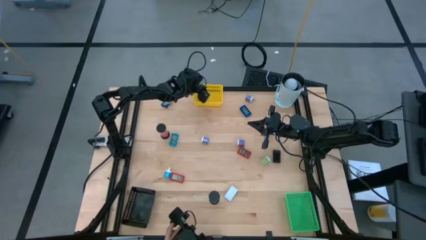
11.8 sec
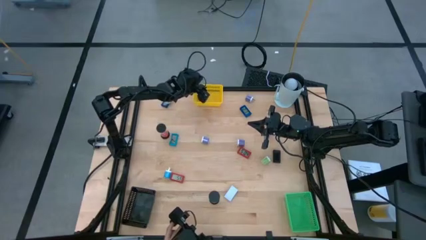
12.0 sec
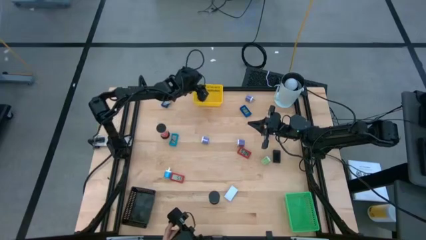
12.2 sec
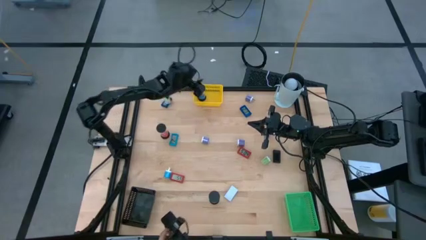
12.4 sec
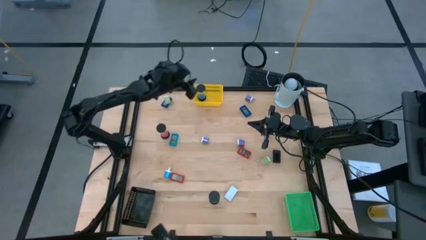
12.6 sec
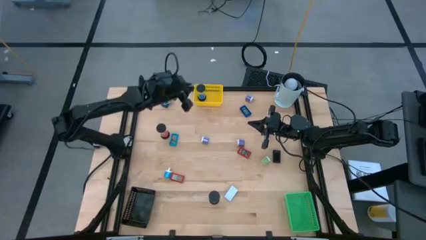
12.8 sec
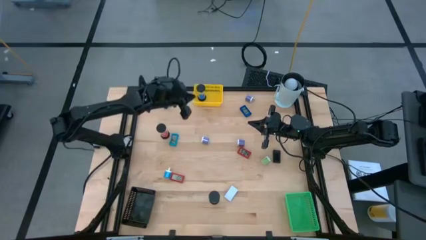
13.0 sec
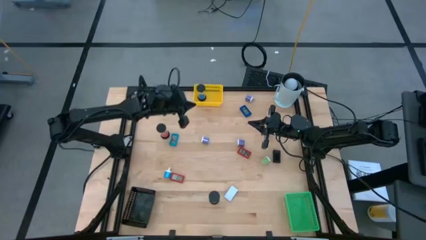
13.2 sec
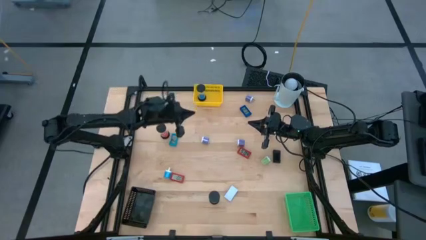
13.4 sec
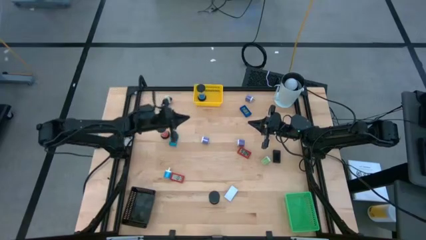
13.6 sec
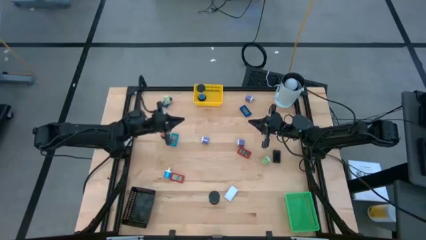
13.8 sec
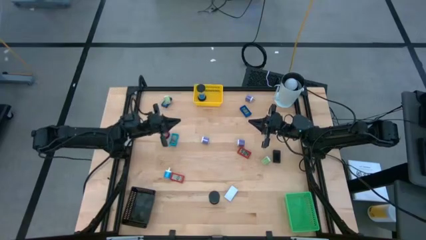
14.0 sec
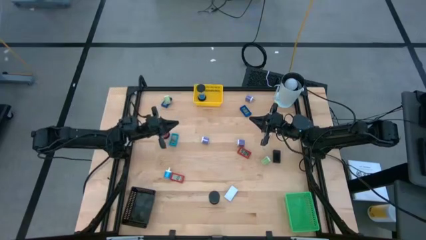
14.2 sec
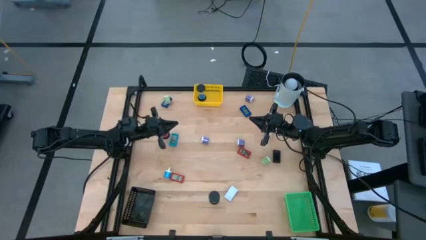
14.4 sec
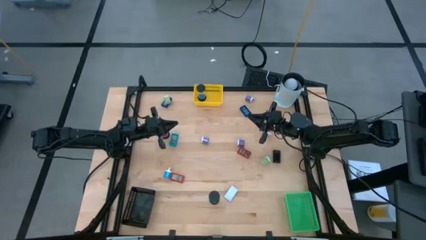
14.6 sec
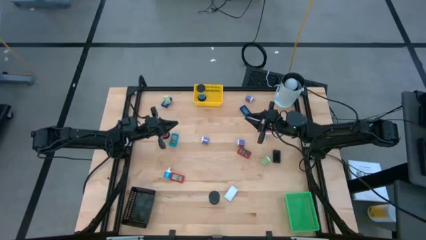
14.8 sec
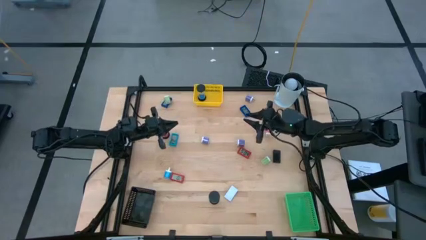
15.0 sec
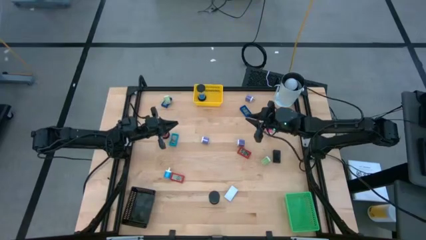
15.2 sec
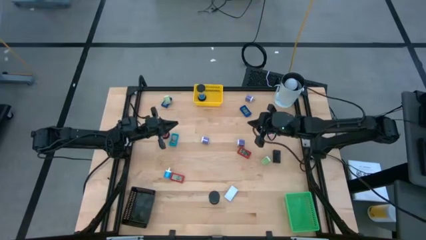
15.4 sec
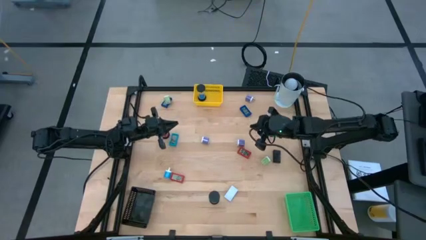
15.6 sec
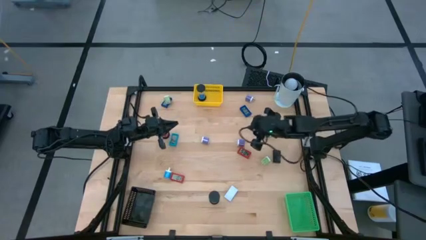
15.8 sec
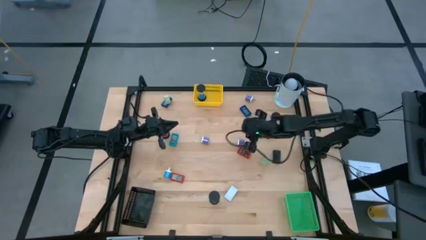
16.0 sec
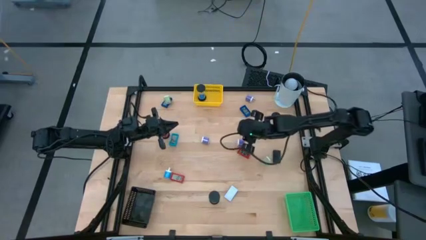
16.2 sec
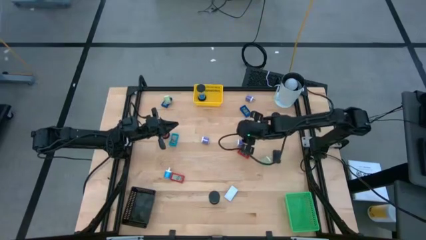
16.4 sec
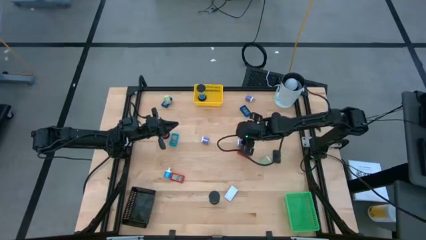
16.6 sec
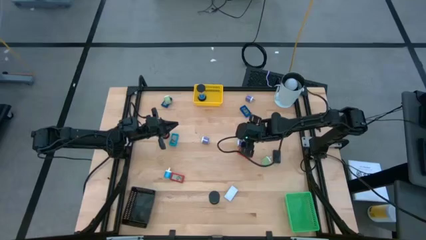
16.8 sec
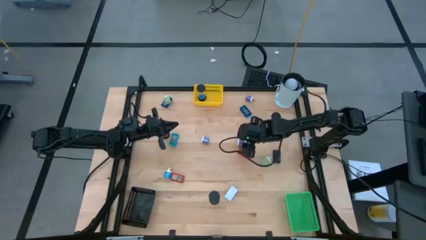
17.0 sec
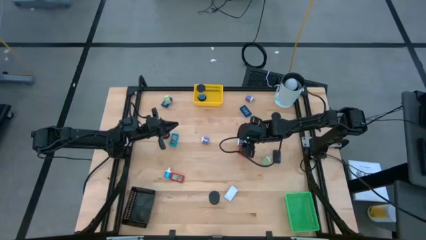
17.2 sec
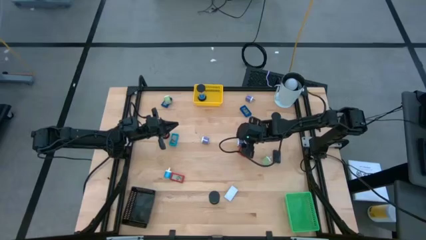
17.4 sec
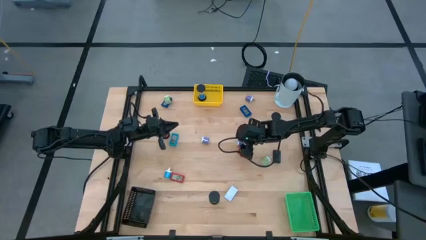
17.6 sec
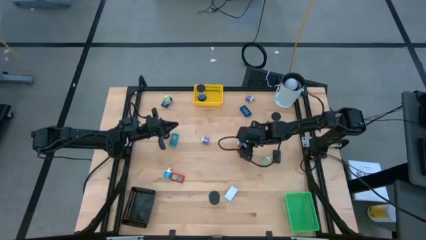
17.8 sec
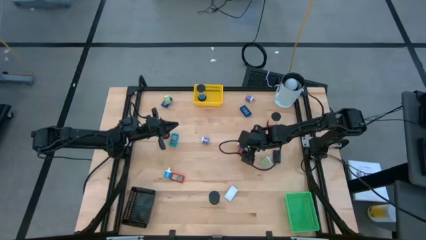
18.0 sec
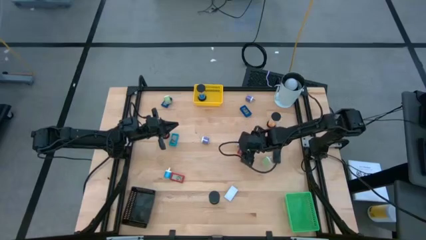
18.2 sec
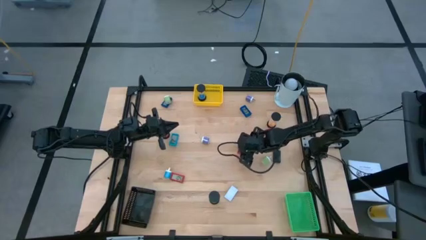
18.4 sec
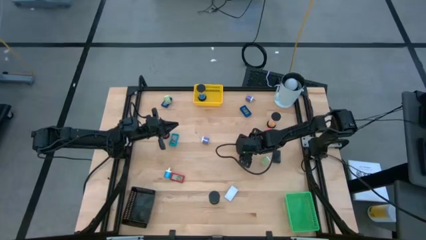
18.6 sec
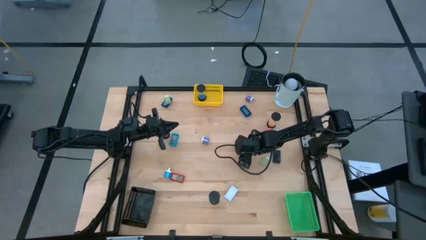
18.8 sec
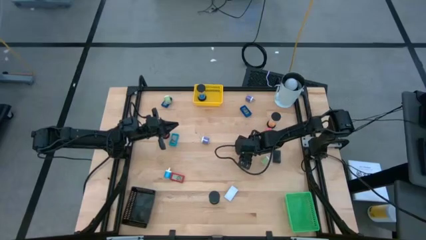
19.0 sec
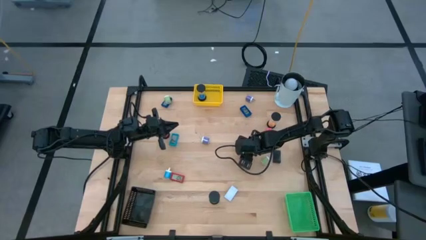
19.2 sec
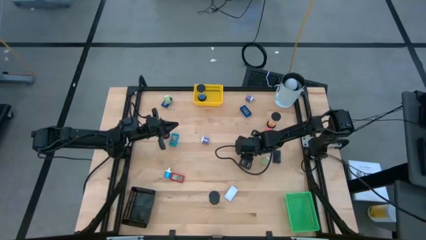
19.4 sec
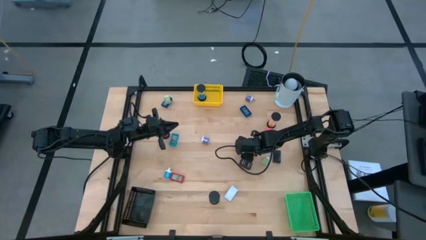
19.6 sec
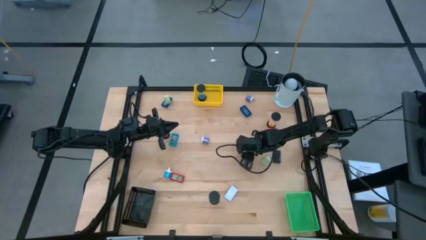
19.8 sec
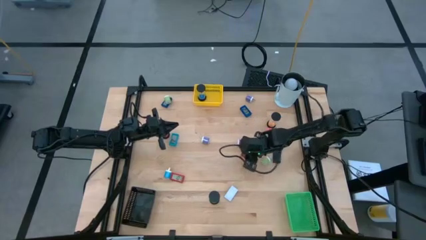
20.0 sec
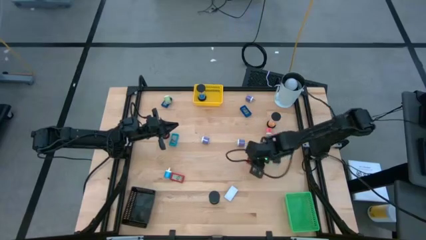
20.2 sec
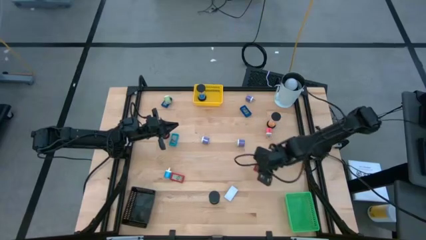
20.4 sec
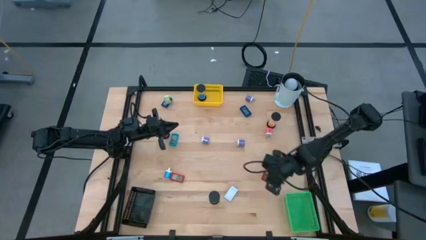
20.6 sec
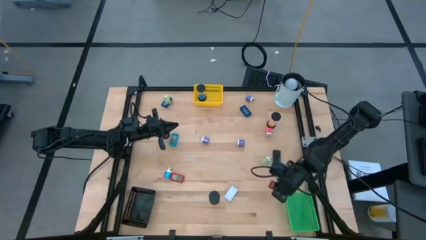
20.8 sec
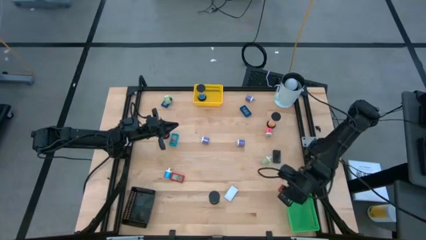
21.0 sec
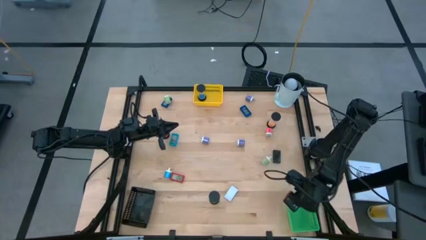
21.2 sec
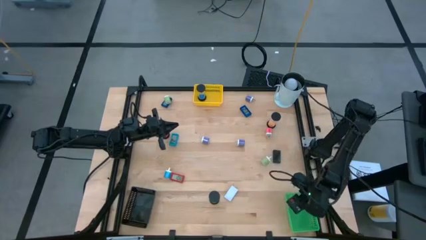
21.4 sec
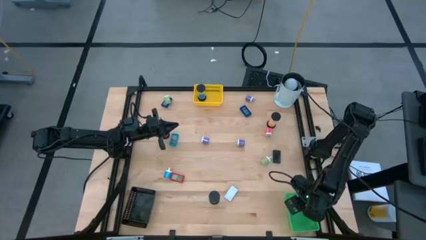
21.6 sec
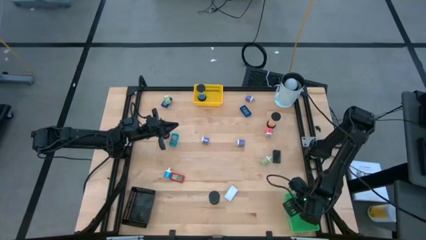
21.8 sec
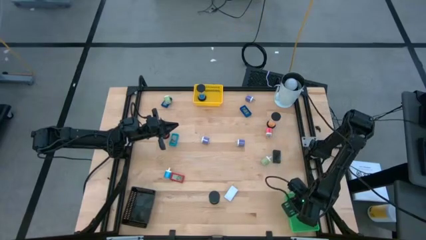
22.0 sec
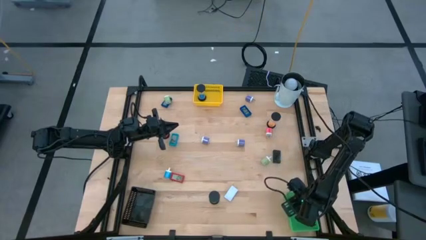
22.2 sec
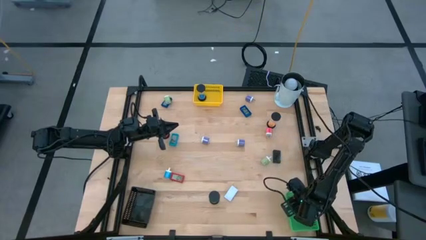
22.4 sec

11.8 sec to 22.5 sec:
Task: Pick & Place Office items
Put the red digital timer into the green bin
